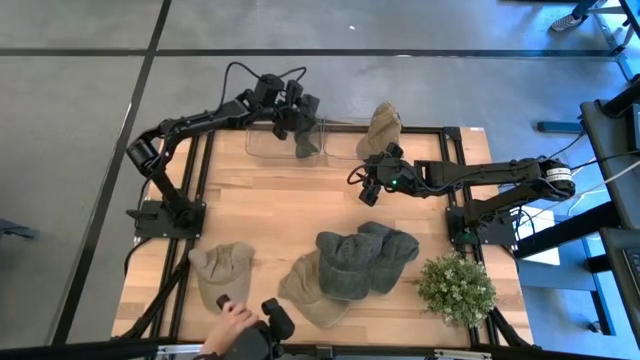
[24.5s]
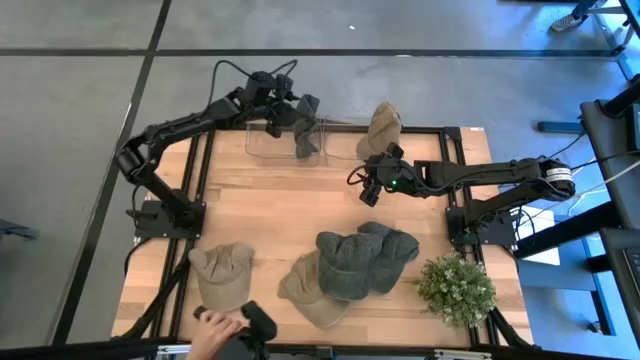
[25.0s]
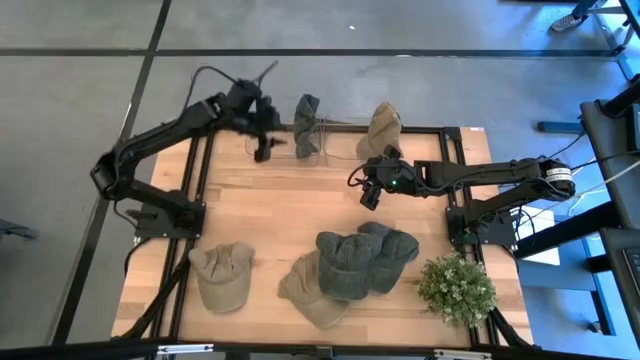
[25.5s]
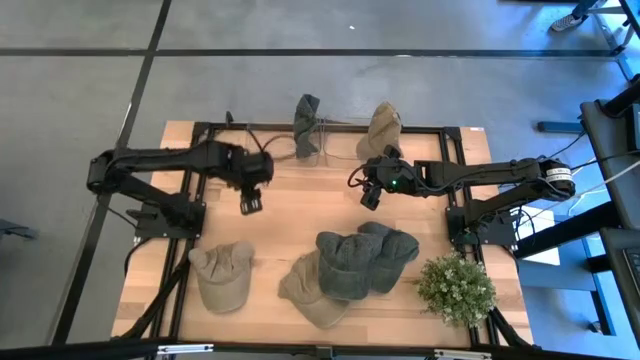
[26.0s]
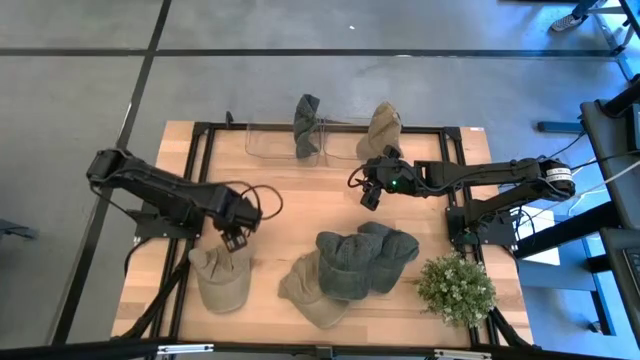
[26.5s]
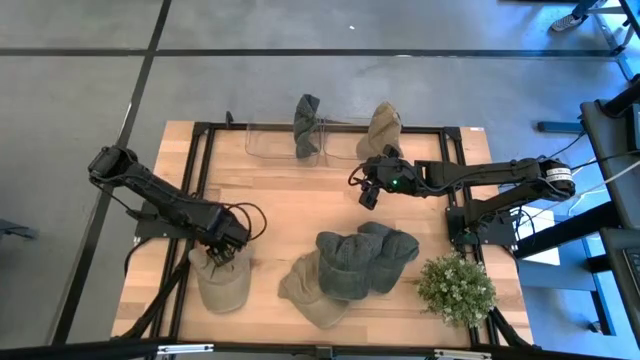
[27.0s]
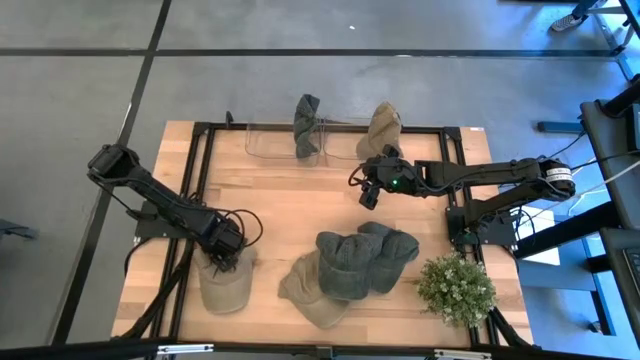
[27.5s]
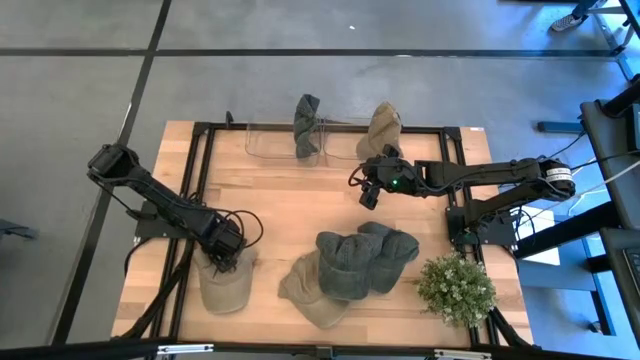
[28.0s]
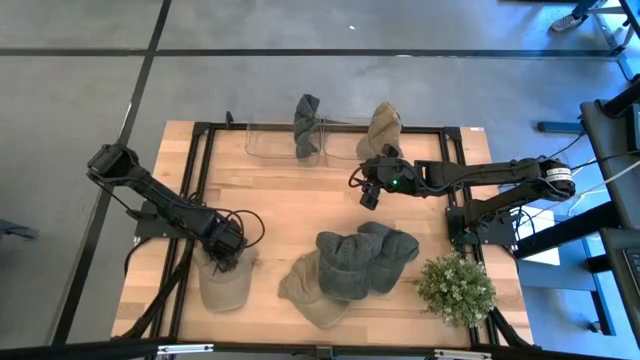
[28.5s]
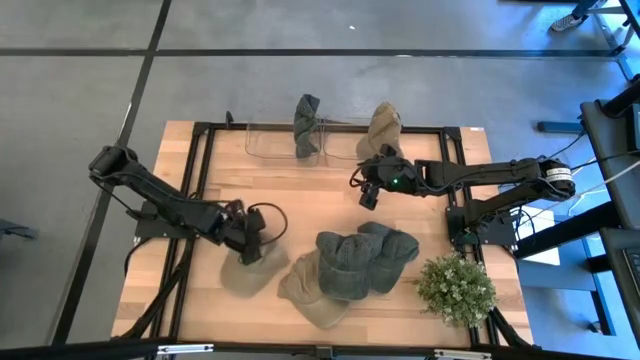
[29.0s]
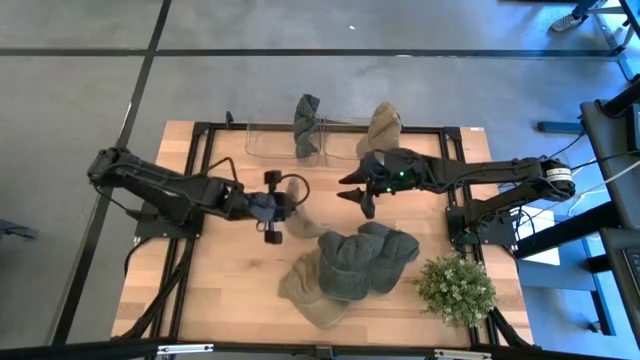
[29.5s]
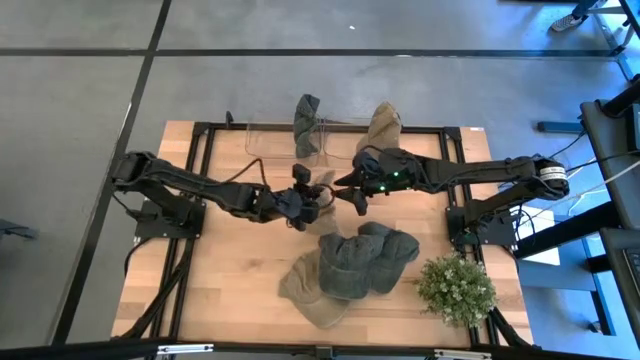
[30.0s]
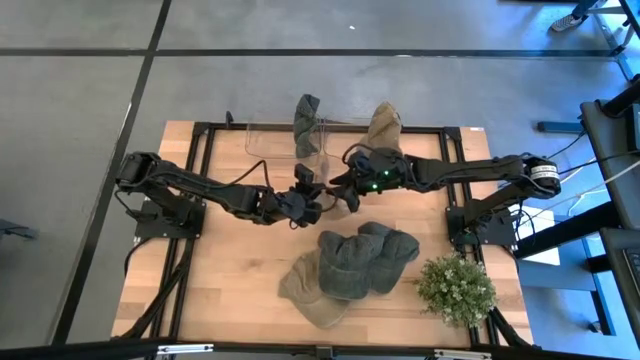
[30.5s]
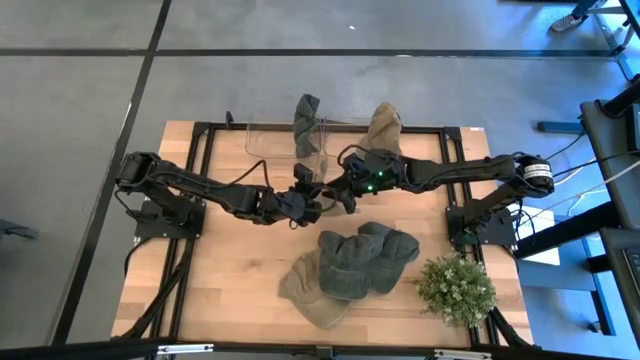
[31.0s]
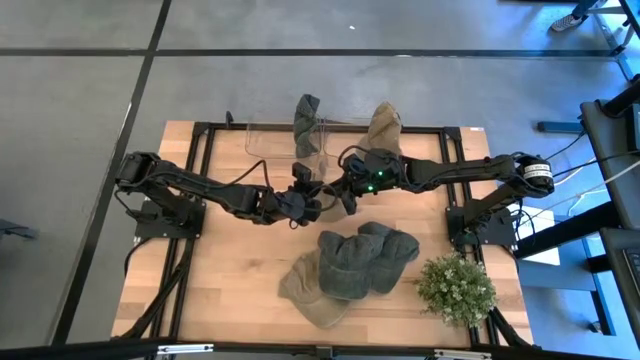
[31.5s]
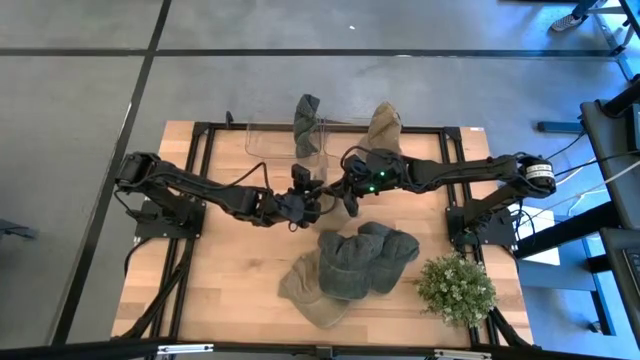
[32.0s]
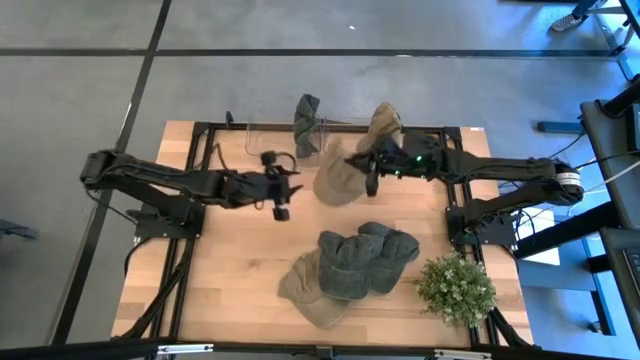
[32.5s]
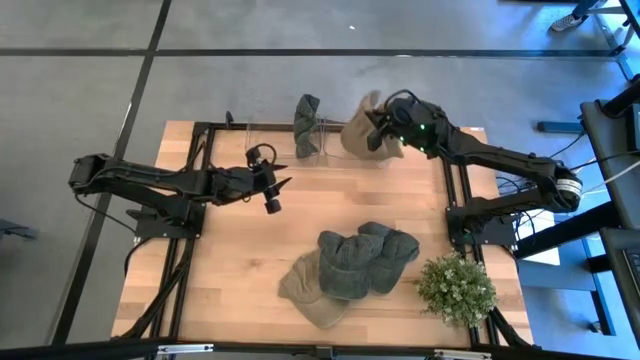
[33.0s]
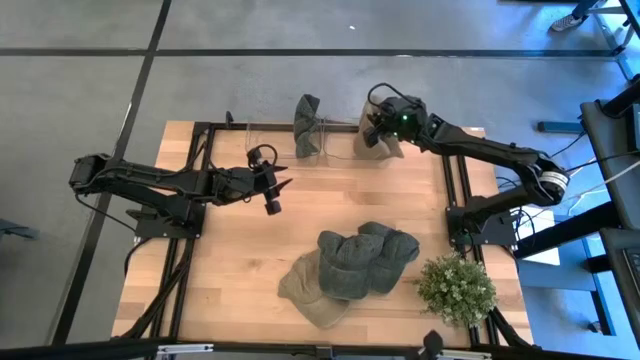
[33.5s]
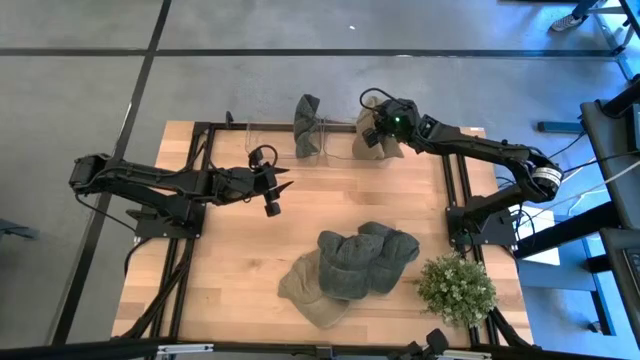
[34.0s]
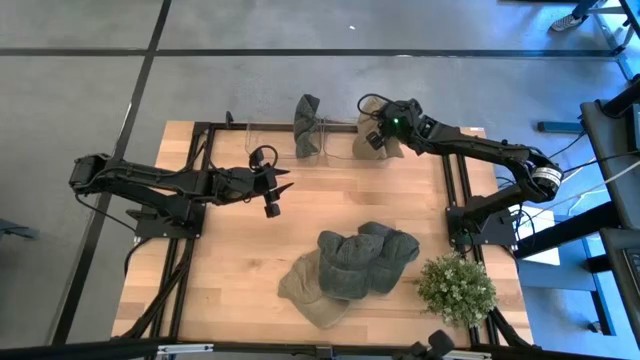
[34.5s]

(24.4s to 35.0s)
Task: Pick & Place hat
Put the left brown cap into the right transparent bin

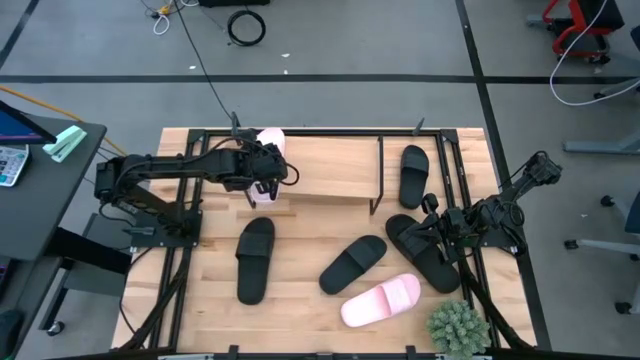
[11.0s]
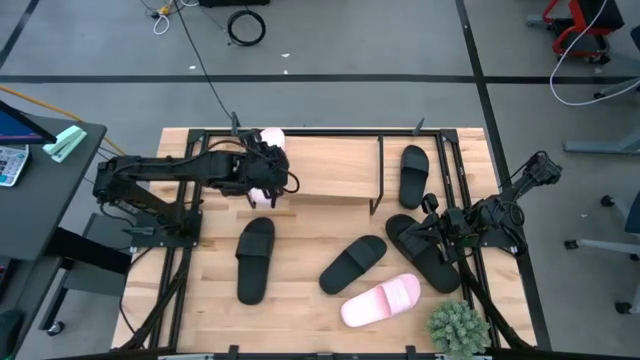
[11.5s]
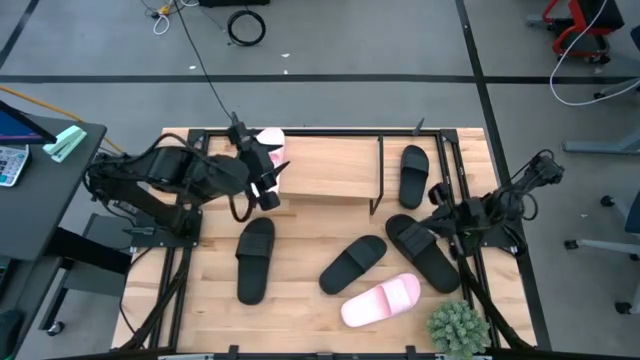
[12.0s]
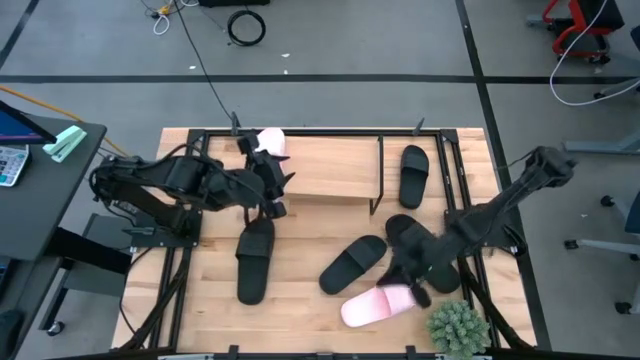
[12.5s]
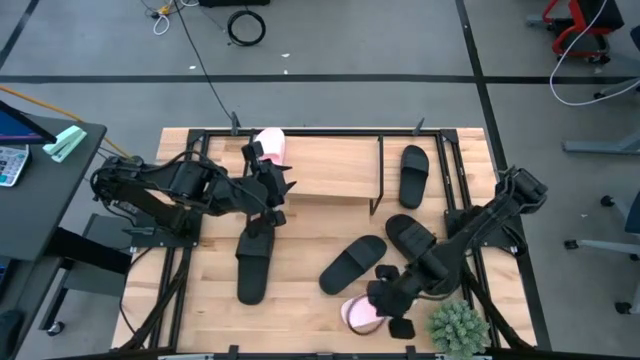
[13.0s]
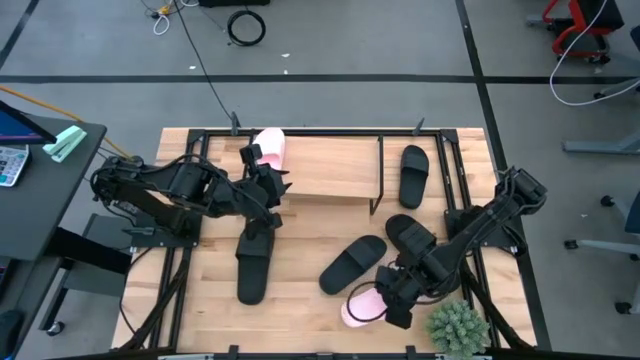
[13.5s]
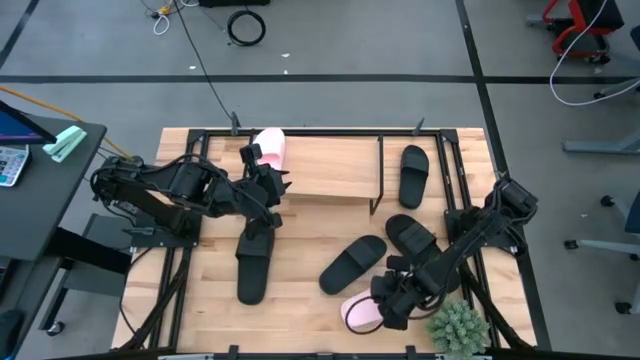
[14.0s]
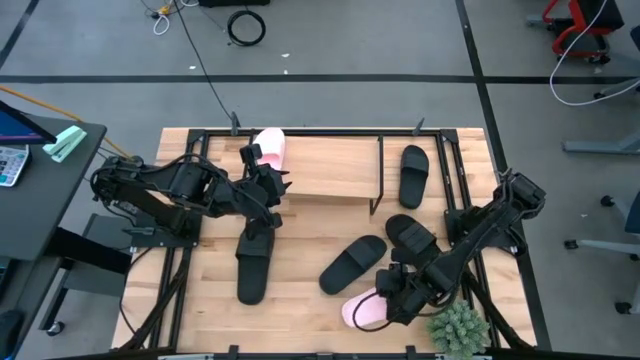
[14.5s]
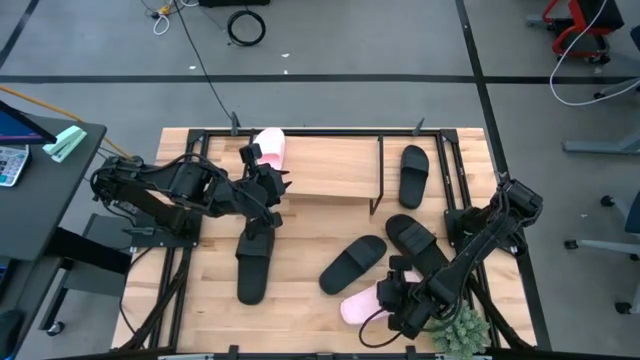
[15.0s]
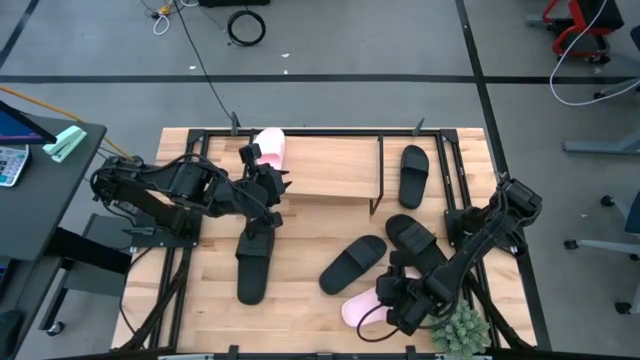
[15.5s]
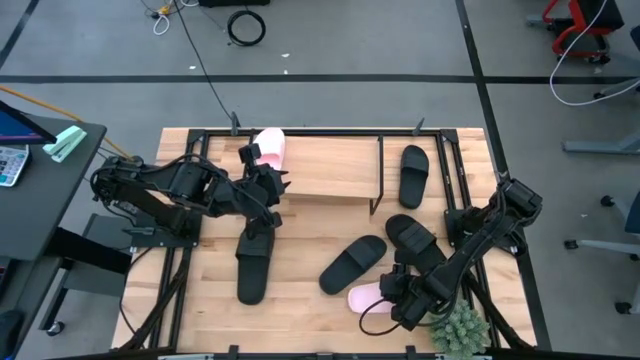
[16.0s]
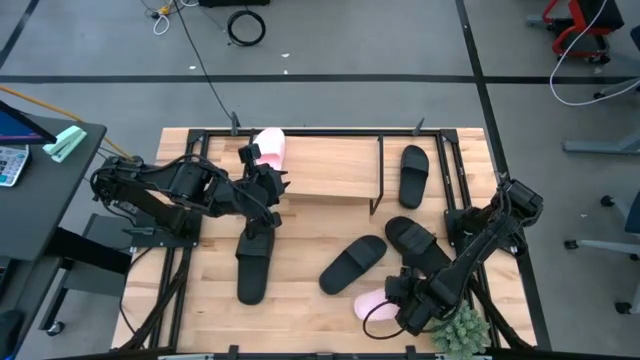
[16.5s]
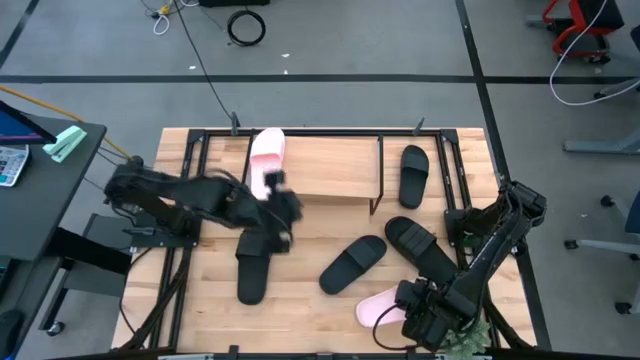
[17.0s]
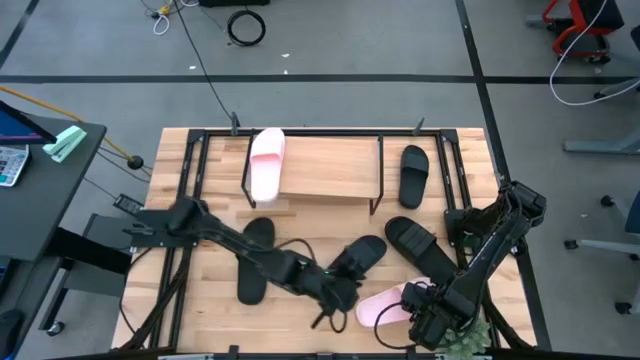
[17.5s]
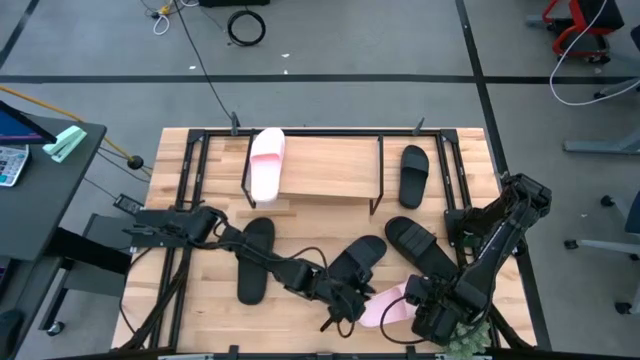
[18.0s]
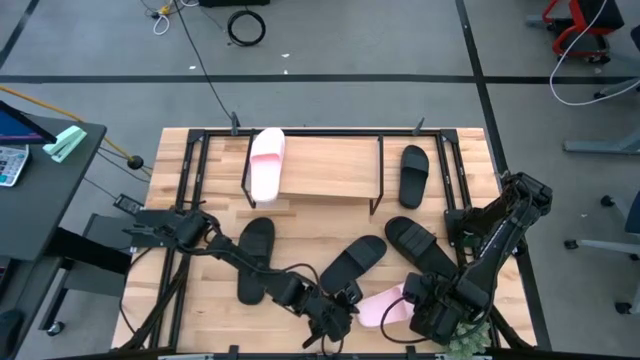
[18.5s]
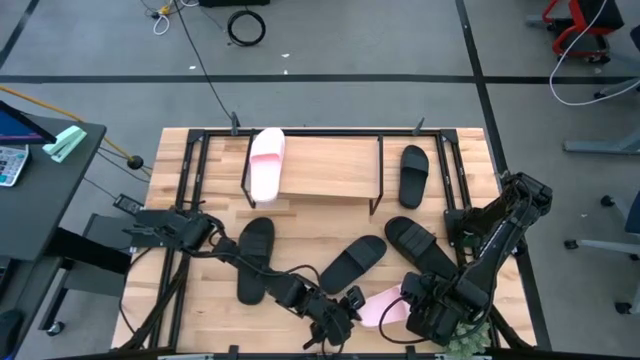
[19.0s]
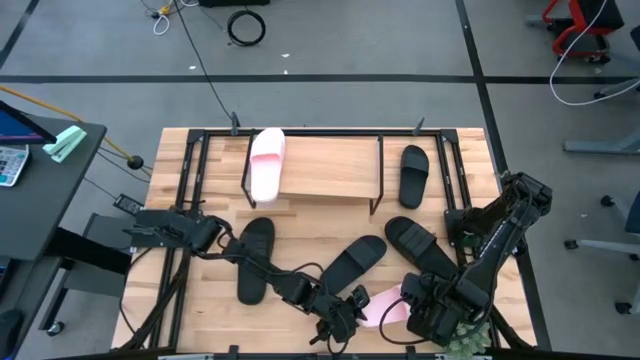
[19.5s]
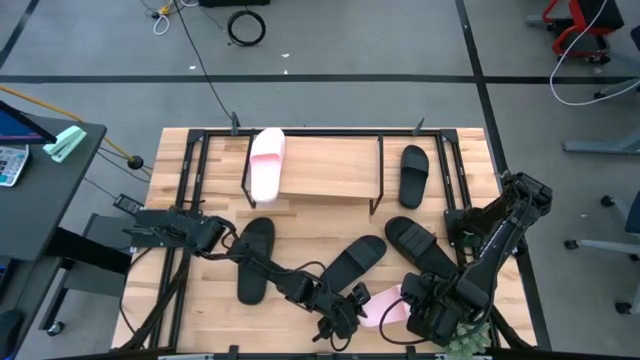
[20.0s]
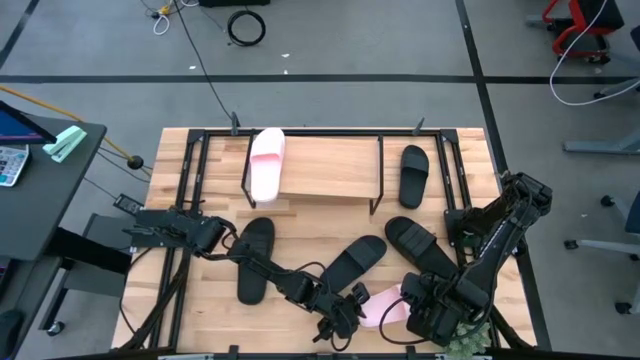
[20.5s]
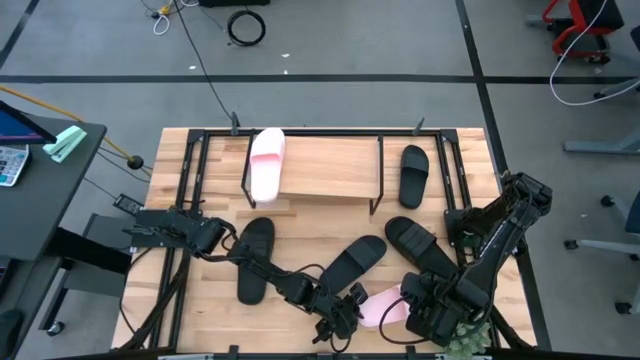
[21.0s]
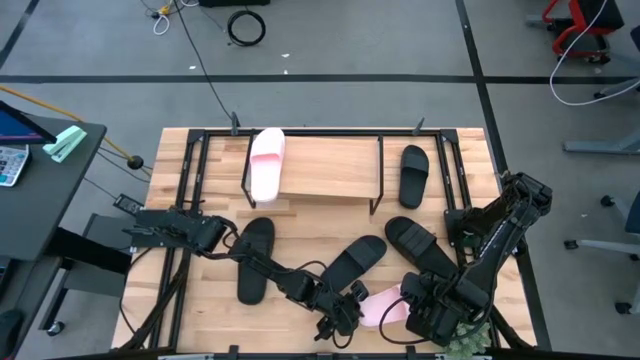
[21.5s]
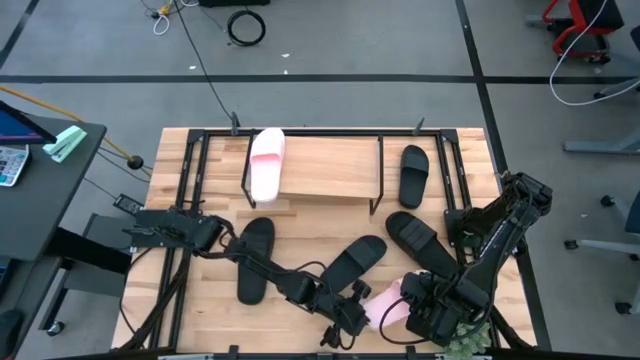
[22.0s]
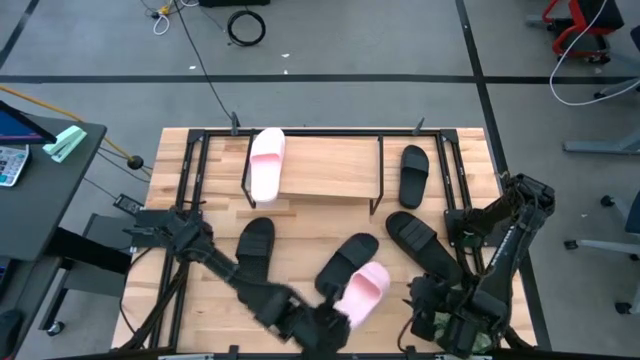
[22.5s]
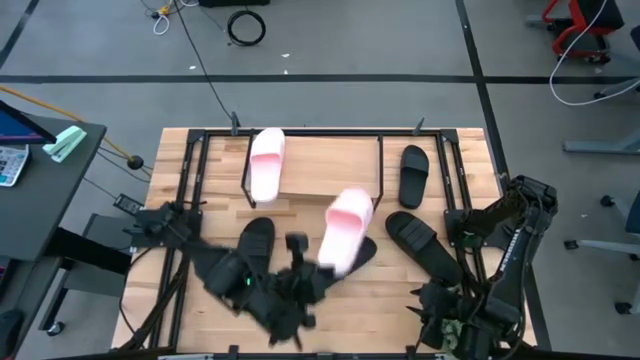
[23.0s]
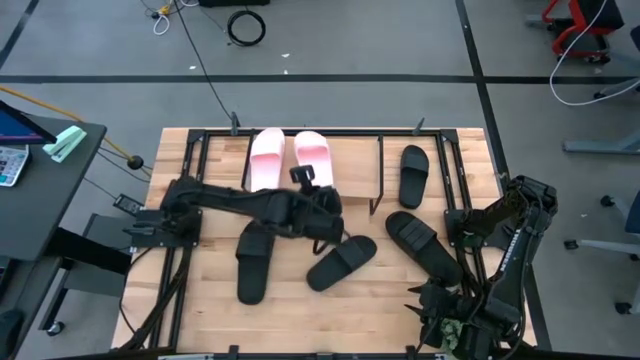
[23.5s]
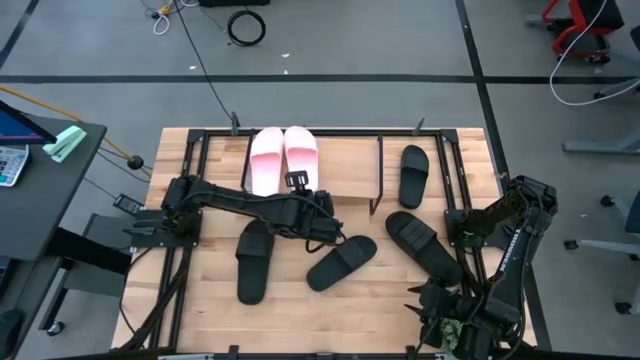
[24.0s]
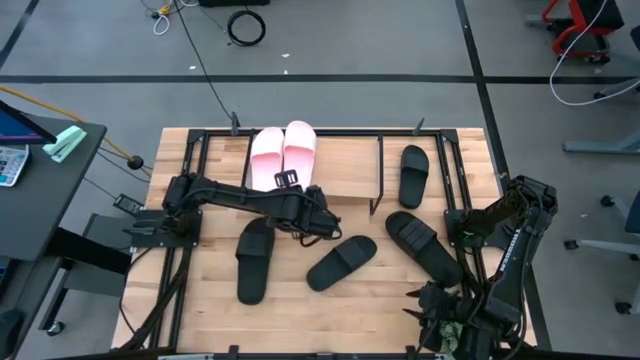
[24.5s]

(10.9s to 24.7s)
Task: Pick and place slides into the shelf
Put the pink slipper on the shelf
